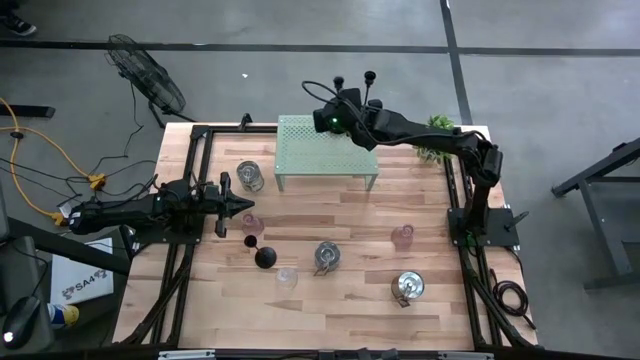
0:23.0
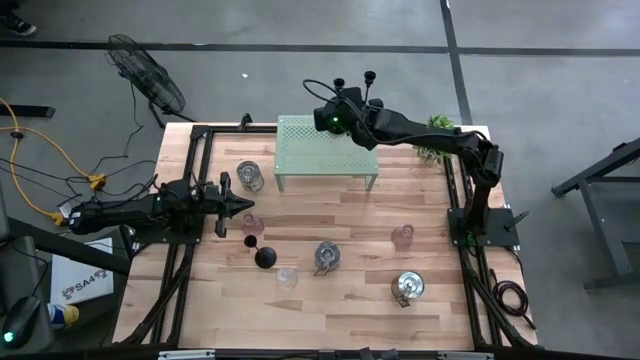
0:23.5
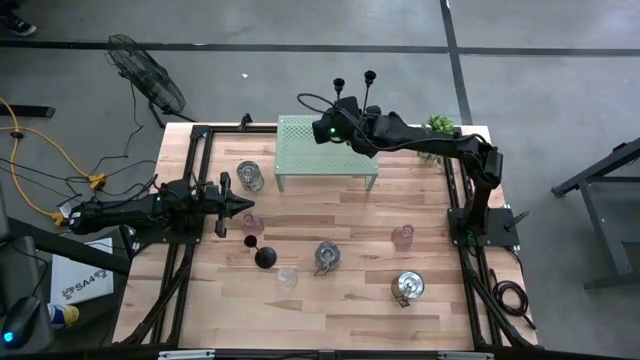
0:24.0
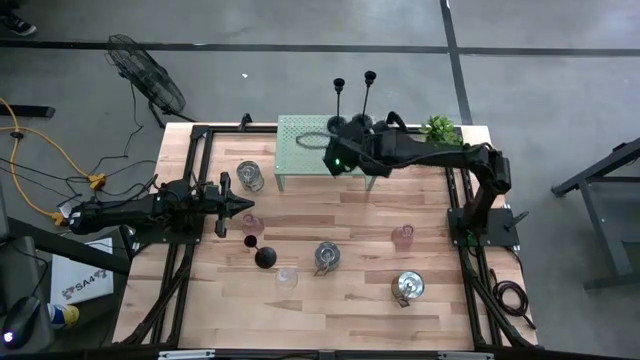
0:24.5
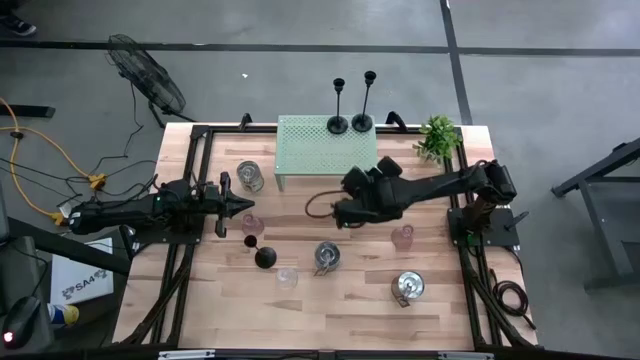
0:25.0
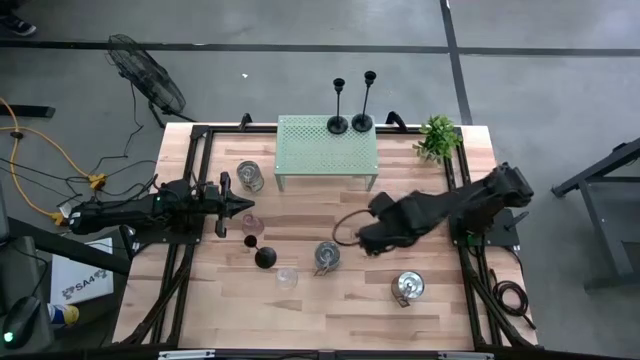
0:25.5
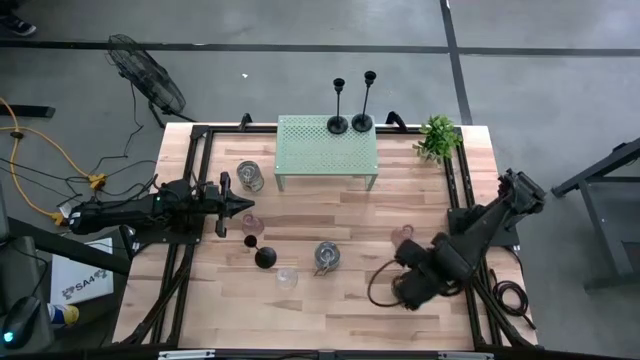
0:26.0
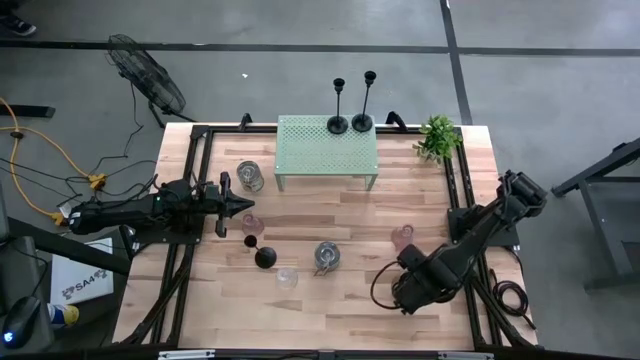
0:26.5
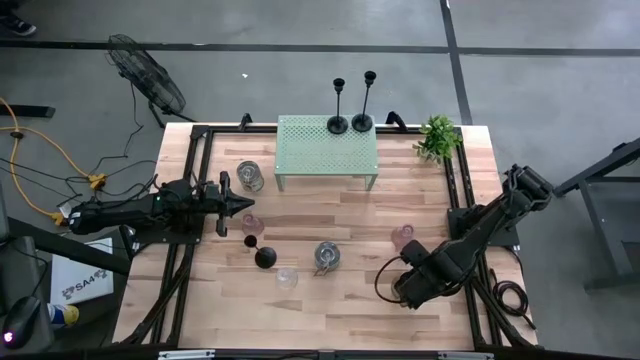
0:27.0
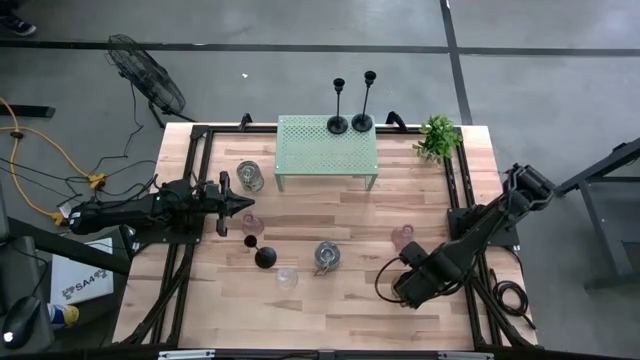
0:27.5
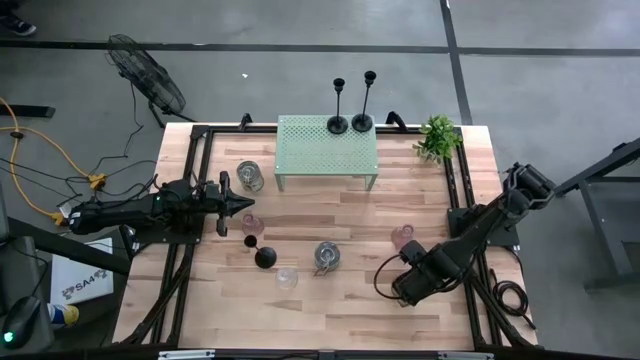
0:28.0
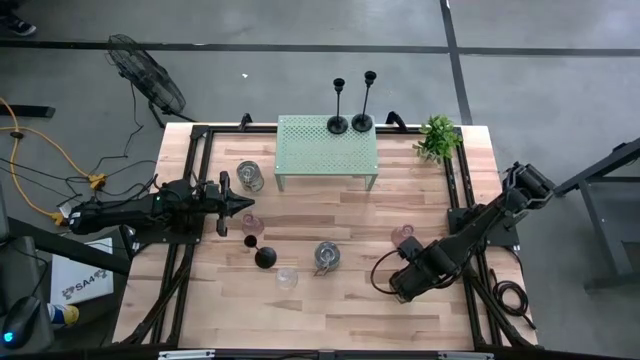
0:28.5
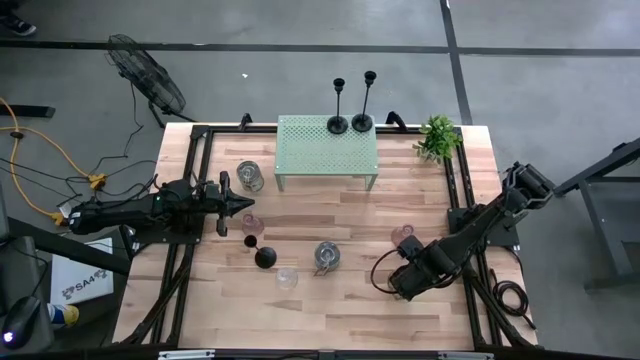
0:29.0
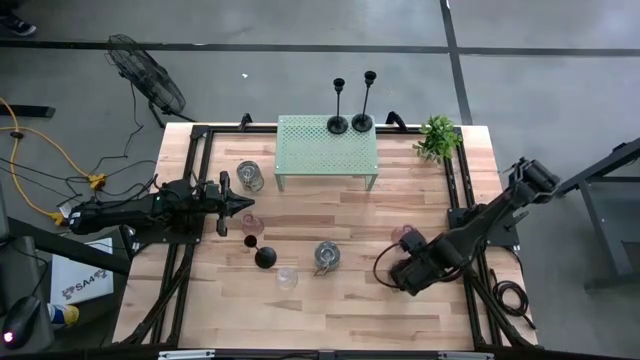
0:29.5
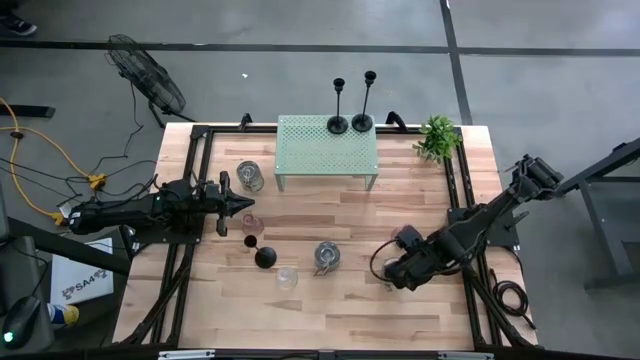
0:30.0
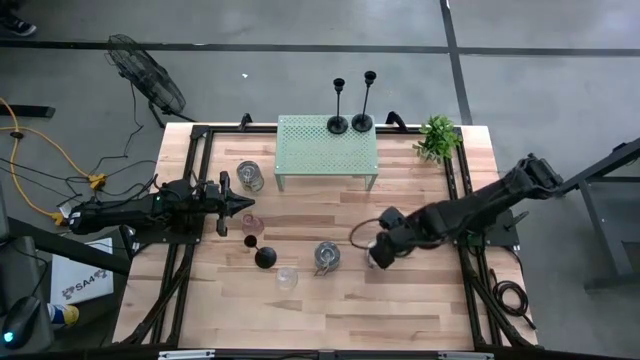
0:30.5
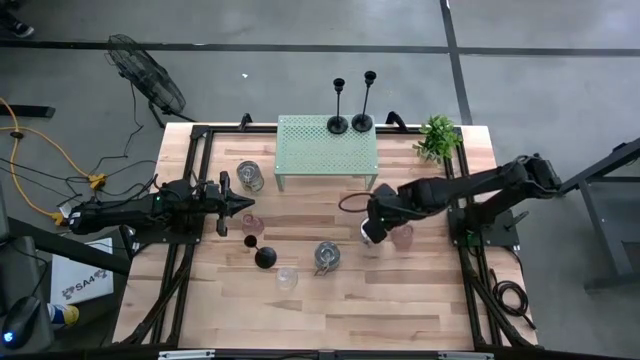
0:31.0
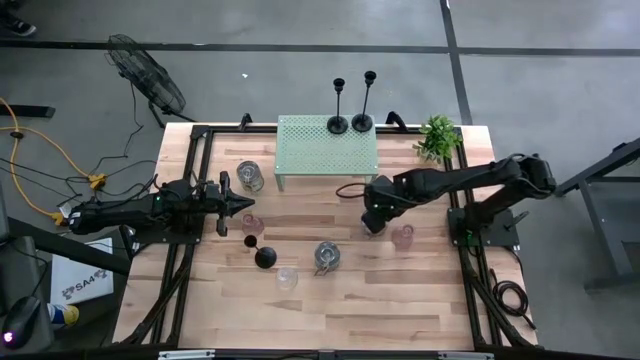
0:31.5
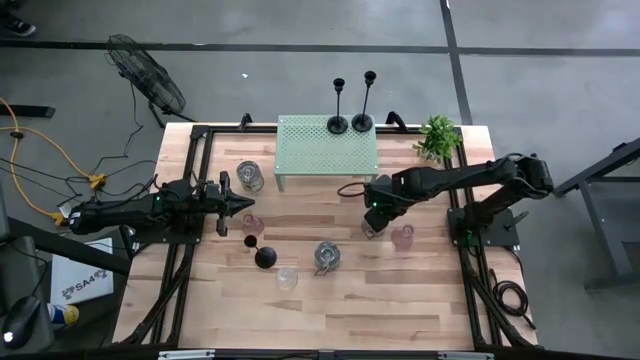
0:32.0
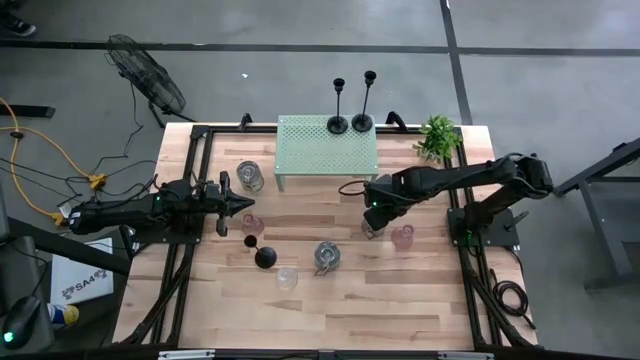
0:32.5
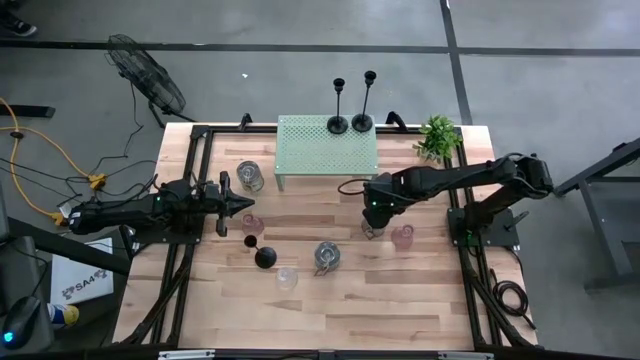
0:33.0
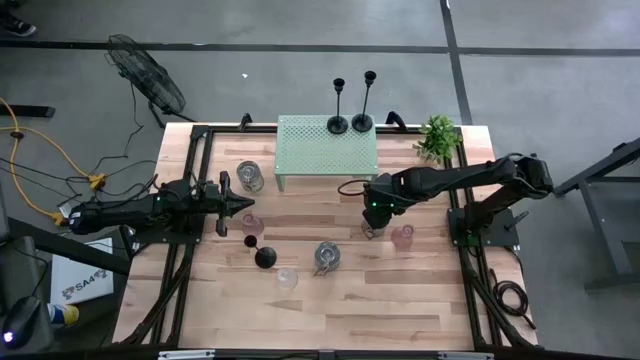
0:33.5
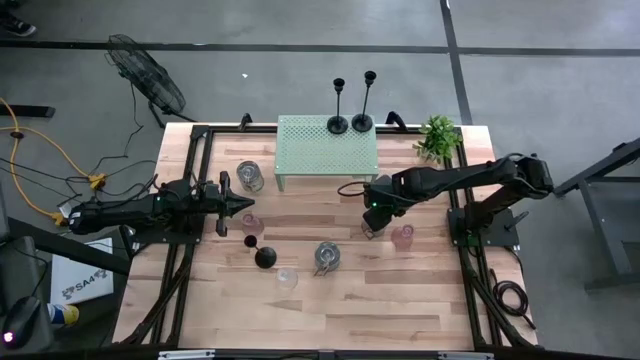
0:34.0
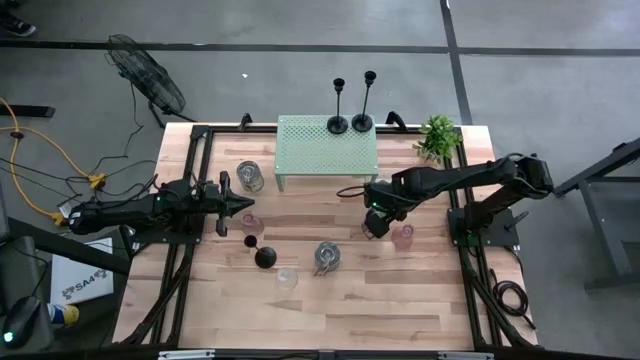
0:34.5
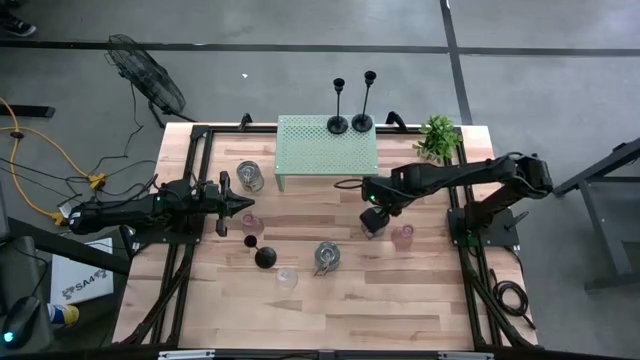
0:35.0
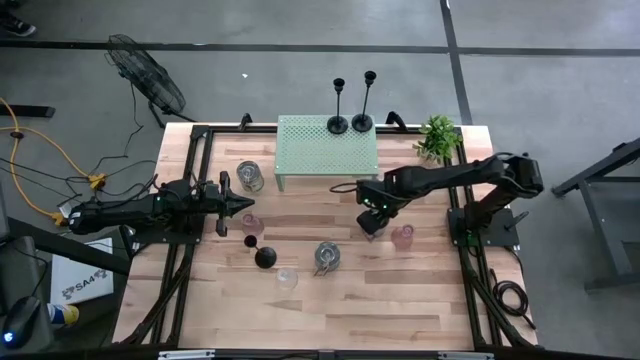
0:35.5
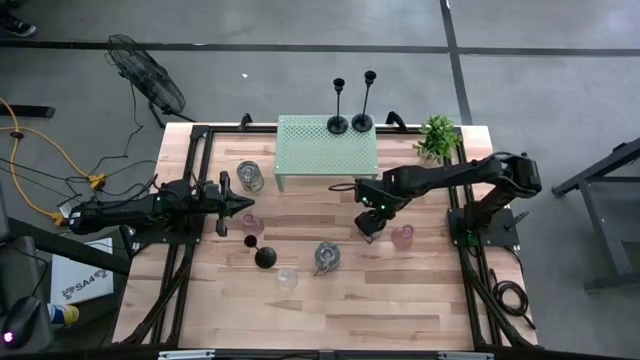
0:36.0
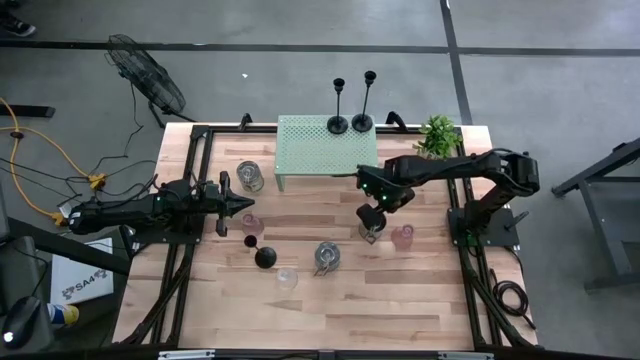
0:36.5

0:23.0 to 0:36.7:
Task: Pick & Place candle stick holders
Put the bottom silver scented candle on the shelf
